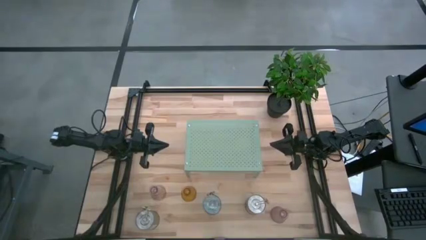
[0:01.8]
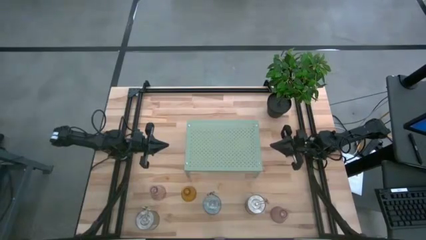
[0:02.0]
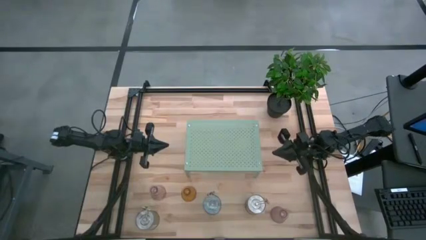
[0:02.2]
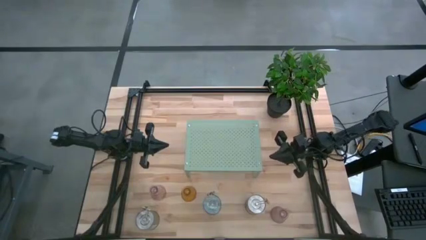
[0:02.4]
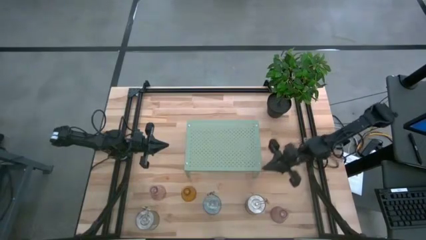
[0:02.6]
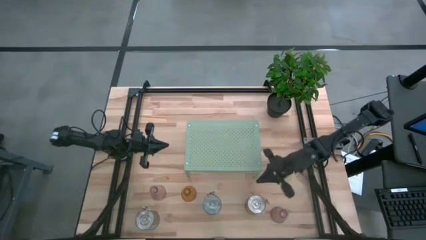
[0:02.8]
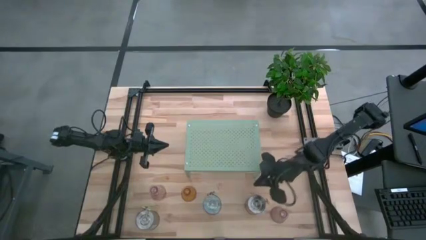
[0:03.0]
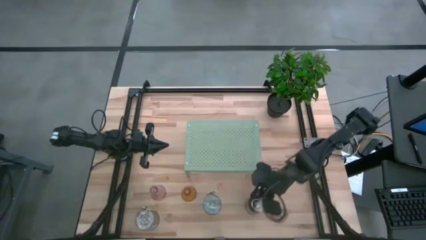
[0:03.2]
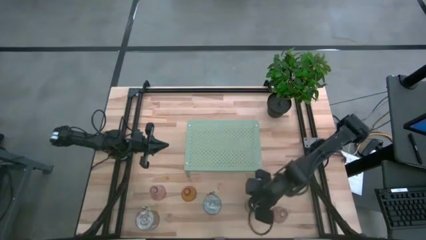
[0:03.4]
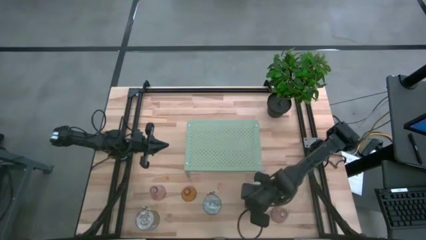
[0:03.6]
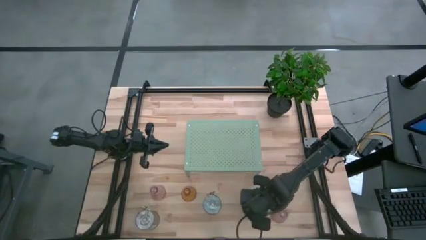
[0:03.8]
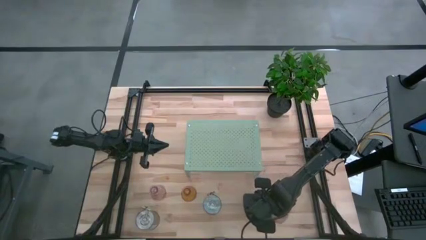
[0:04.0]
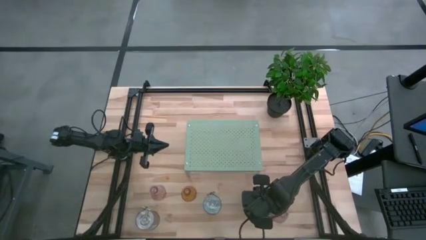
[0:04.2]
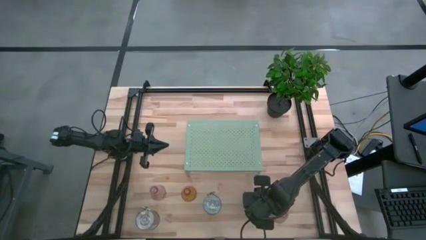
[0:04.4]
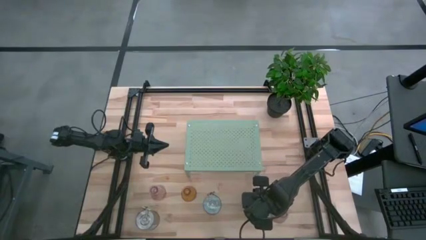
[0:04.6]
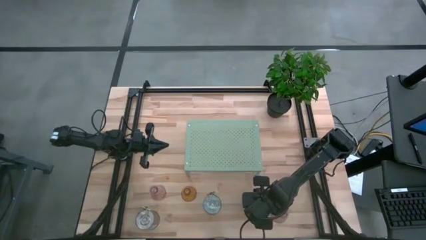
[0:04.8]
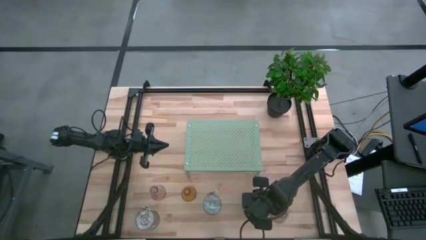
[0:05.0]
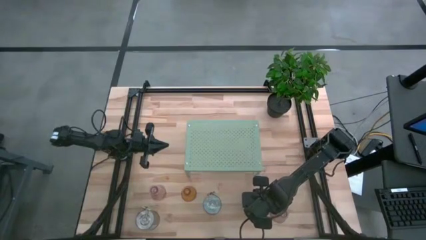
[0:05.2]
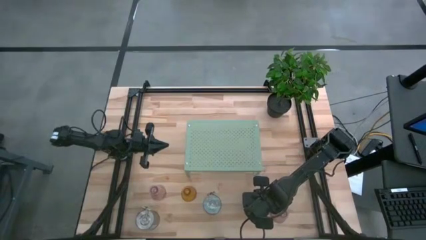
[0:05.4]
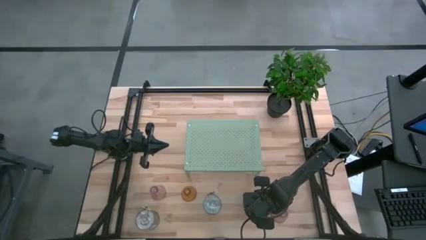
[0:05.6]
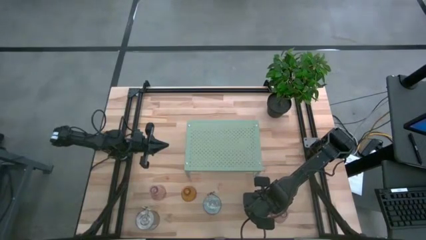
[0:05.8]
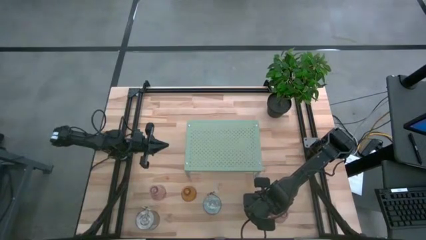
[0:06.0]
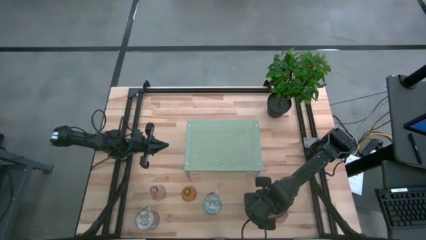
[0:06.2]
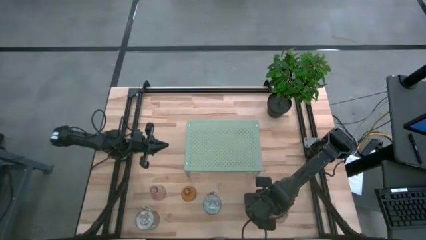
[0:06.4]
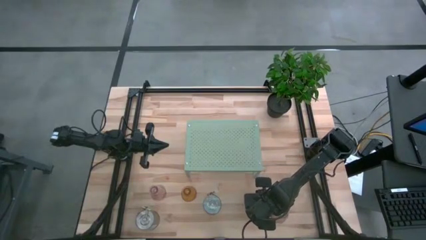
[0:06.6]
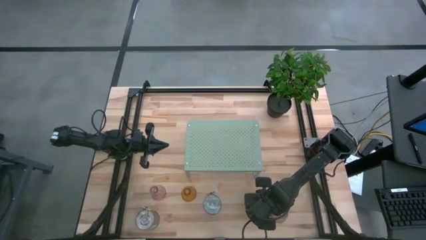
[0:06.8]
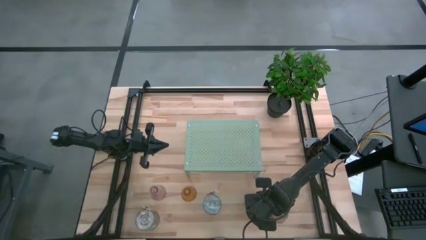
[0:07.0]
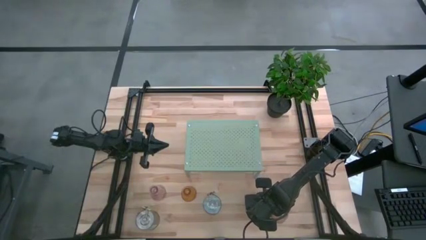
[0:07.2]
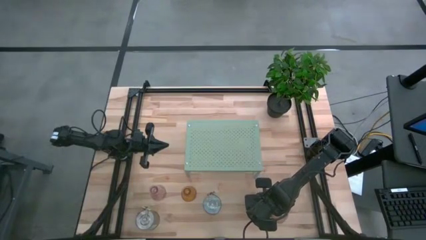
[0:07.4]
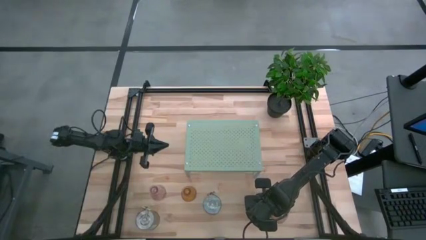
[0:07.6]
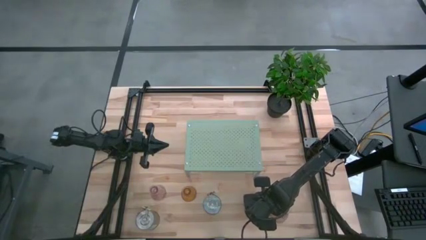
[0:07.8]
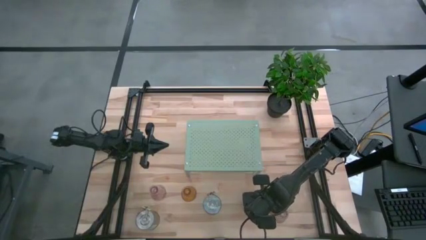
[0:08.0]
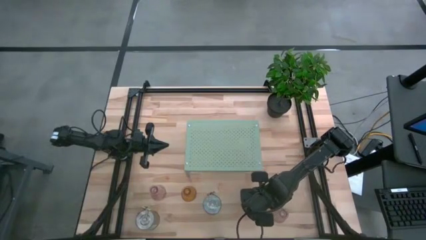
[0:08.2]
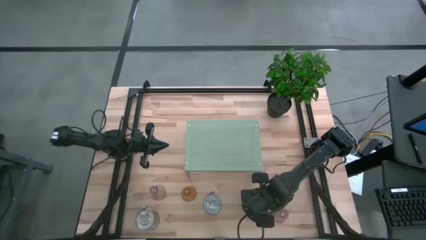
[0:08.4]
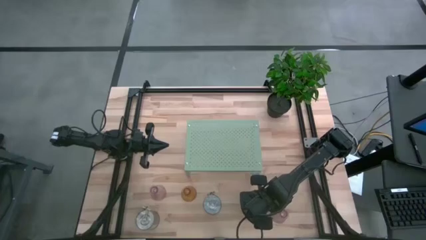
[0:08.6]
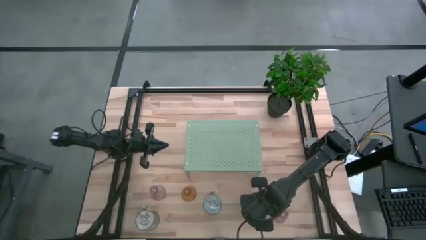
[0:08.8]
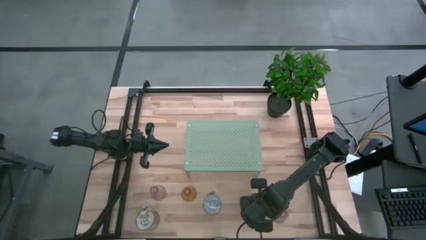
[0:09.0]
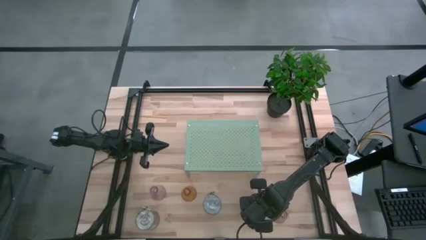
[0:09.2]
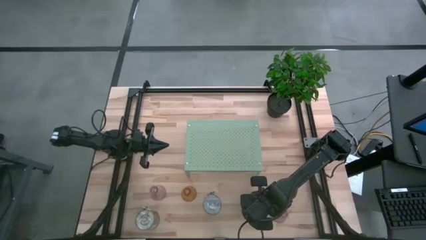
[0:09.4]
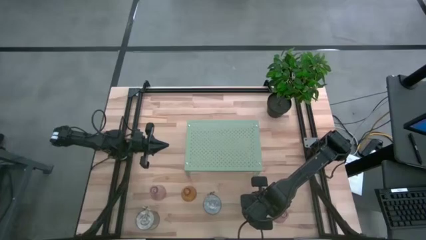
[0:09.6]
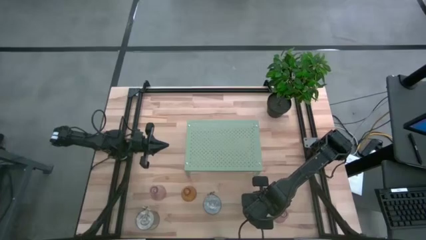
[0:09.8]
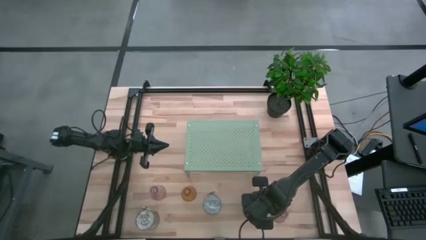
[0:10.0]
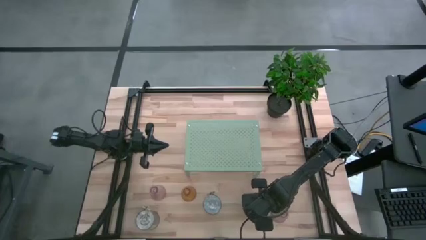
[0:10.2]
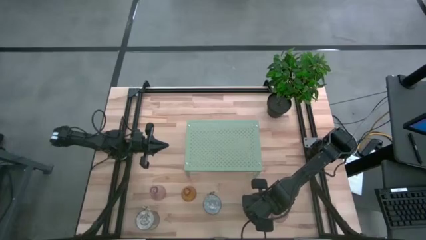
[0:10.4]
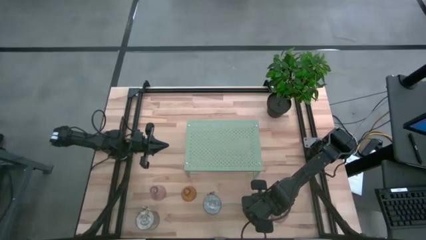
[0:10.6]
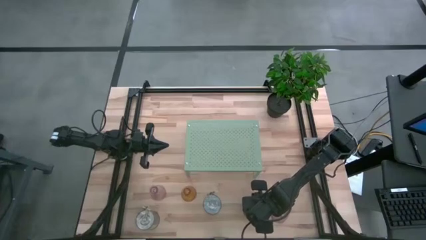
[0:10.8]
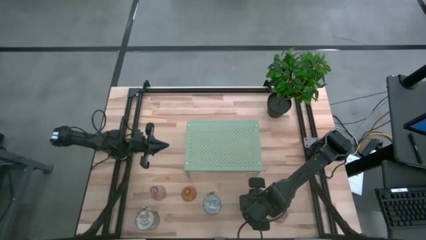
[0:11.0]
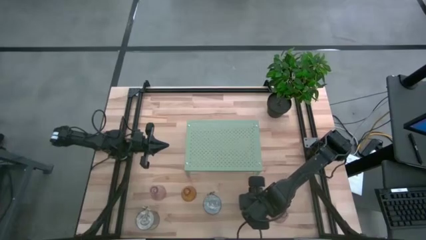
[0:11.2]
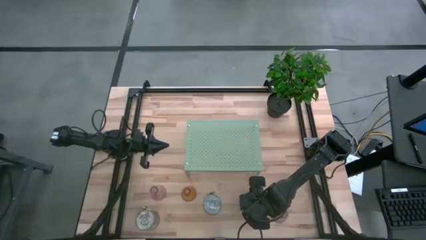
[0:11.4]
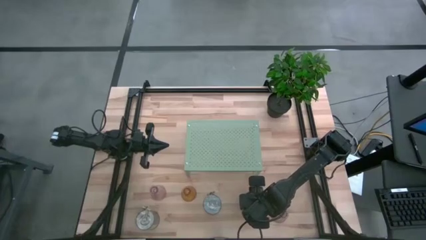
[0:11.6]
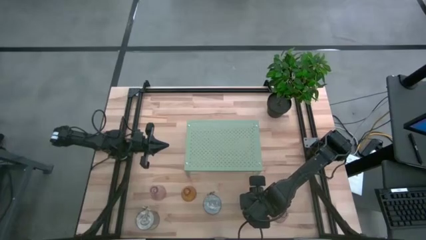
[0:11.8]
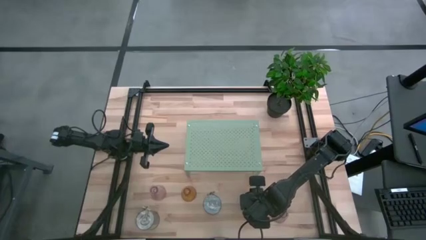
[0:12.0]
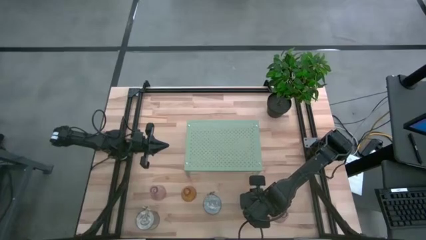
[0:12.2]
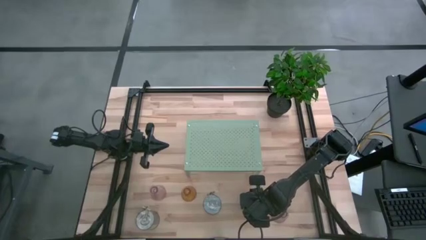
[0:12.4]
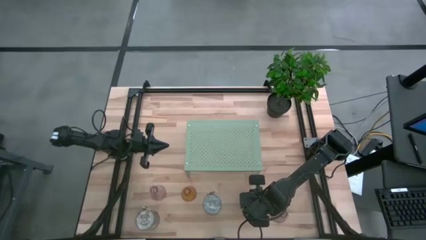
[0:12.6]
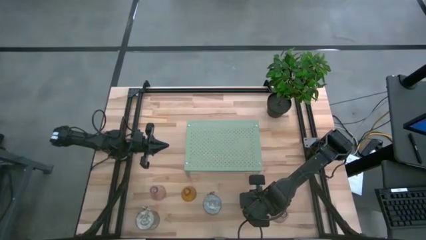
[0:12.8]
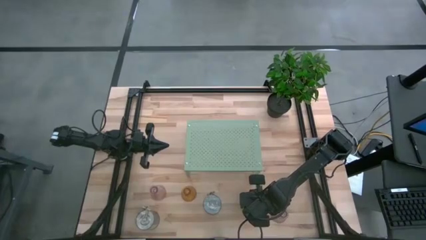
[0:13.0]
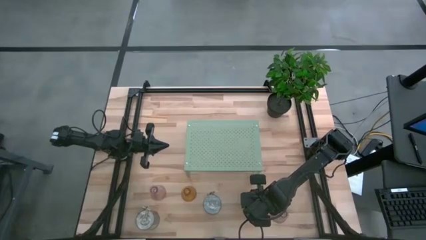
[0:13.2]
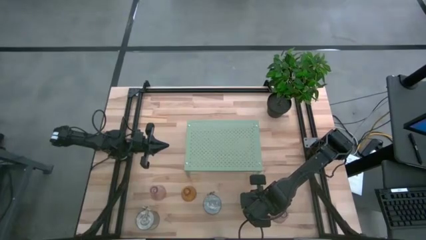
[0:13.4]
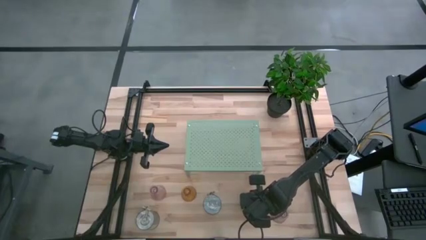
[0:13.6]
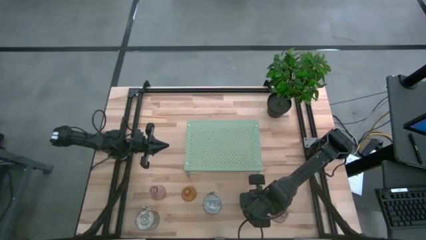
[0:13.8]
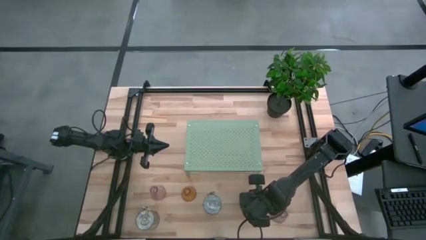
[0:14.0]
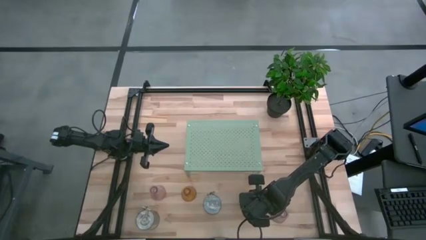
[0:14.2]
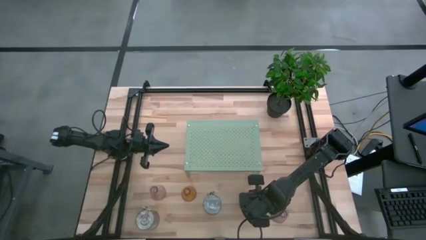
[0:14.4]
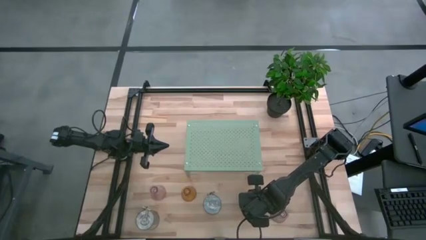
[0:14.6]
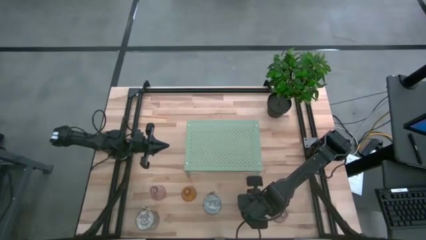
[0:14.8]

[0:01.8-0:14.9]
Task: Pick & Place candle stick holders
Put the orange scented candle on the shelf
